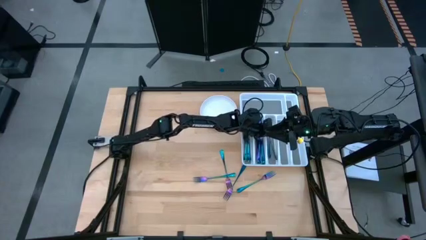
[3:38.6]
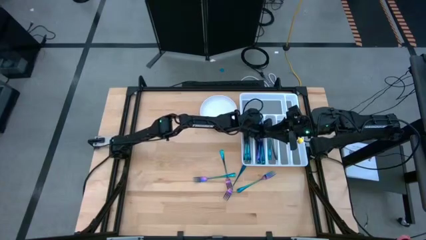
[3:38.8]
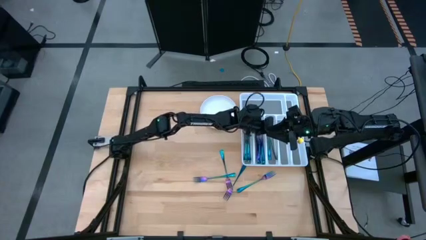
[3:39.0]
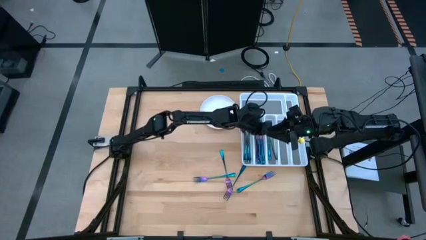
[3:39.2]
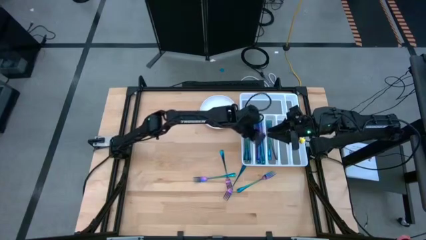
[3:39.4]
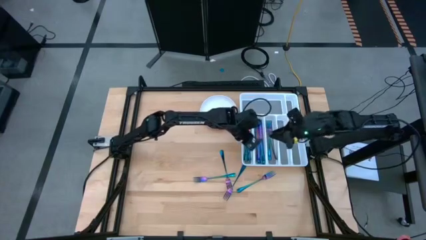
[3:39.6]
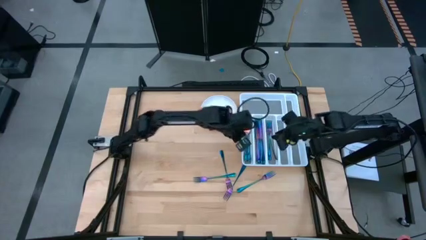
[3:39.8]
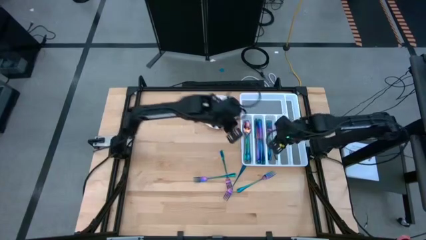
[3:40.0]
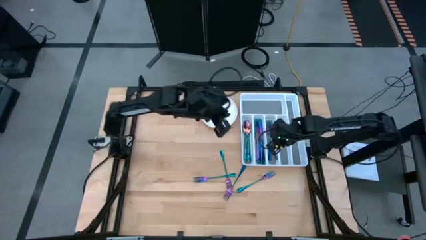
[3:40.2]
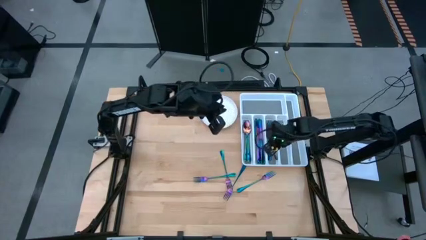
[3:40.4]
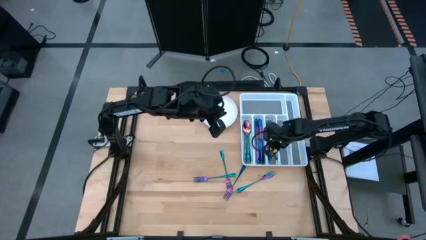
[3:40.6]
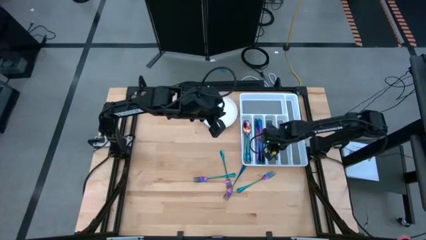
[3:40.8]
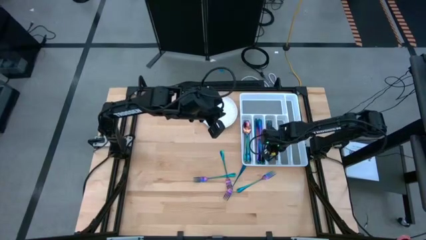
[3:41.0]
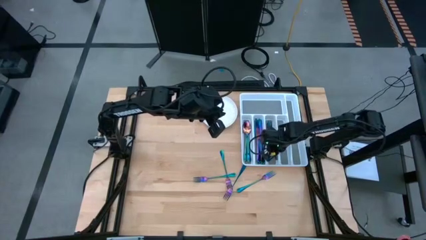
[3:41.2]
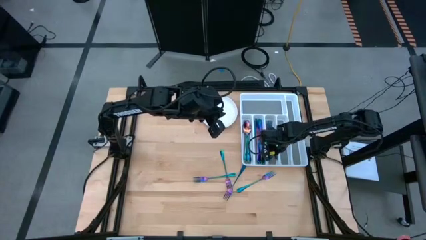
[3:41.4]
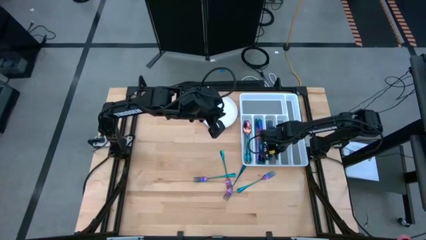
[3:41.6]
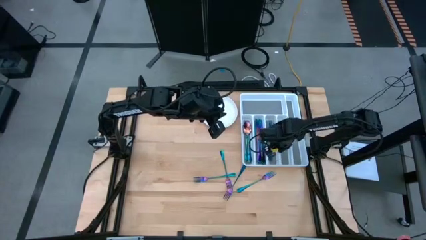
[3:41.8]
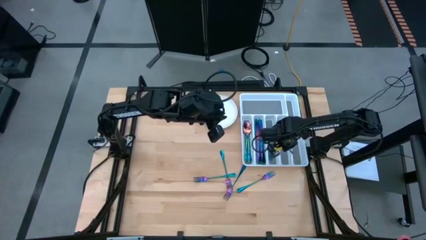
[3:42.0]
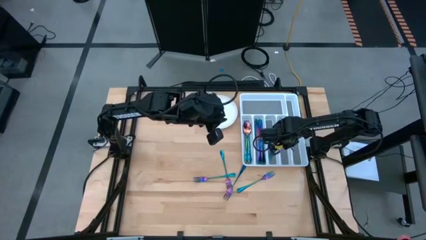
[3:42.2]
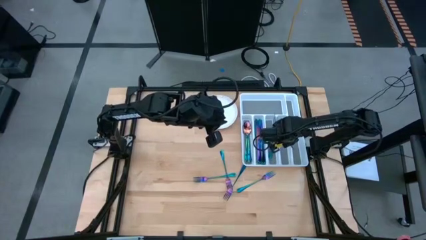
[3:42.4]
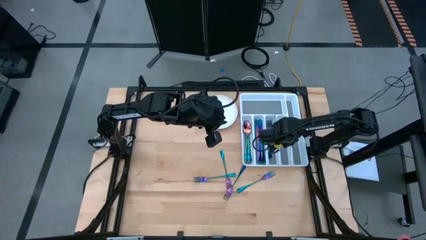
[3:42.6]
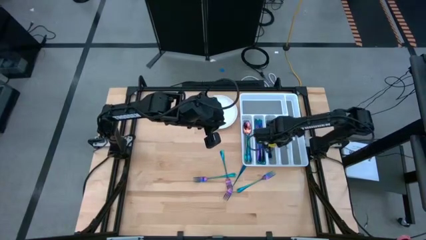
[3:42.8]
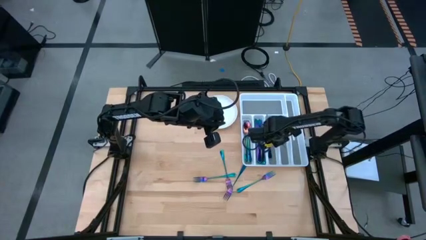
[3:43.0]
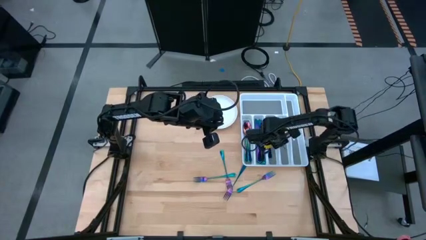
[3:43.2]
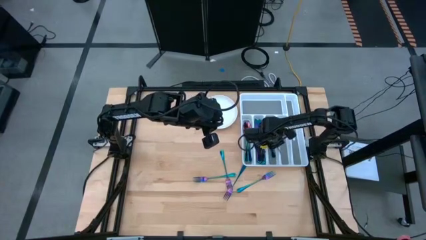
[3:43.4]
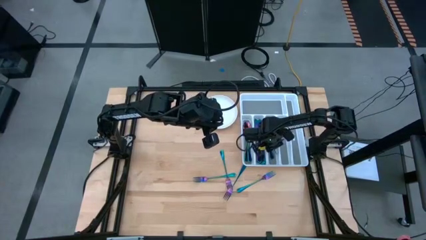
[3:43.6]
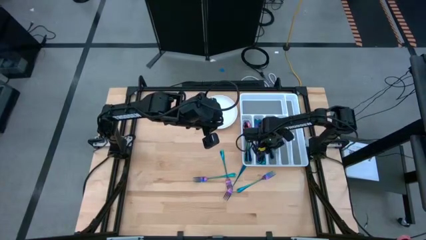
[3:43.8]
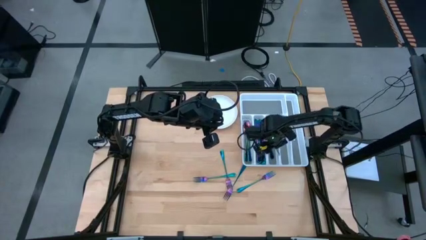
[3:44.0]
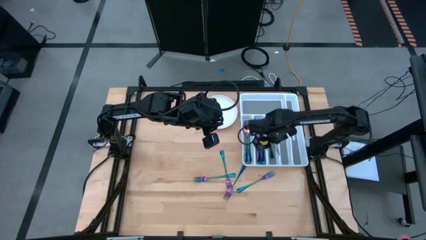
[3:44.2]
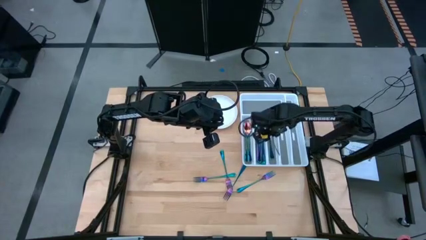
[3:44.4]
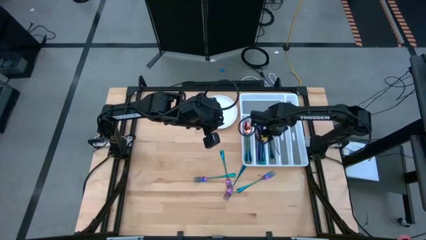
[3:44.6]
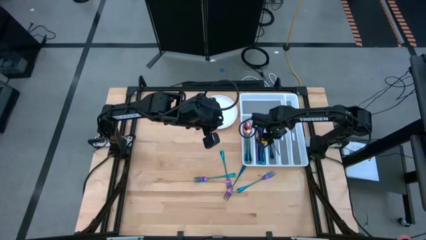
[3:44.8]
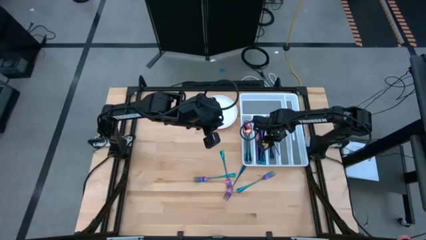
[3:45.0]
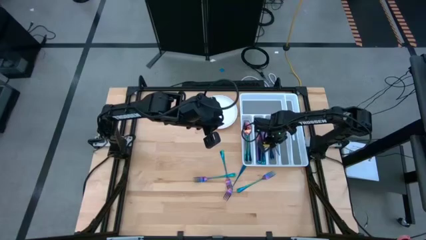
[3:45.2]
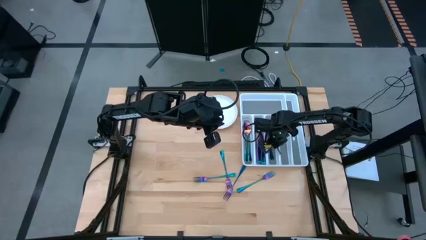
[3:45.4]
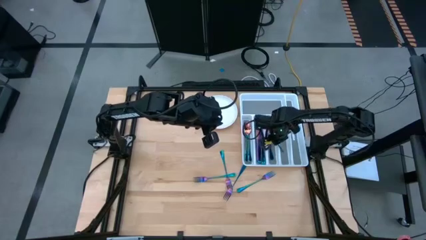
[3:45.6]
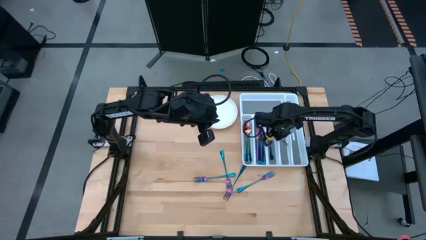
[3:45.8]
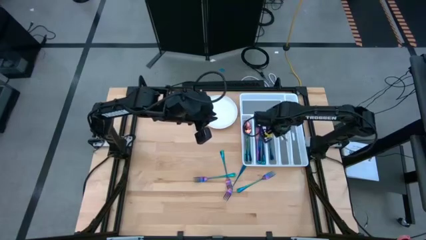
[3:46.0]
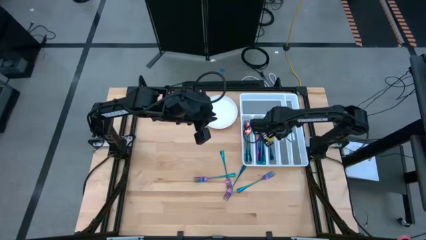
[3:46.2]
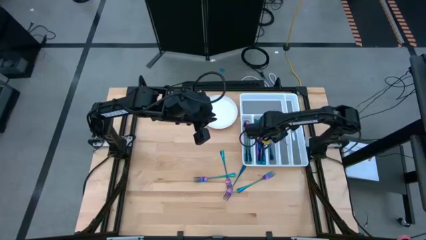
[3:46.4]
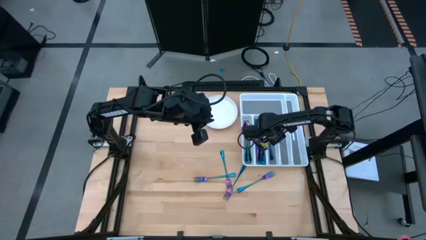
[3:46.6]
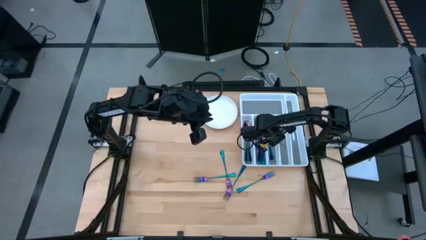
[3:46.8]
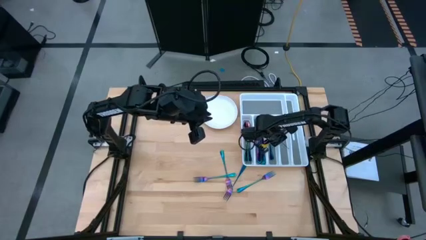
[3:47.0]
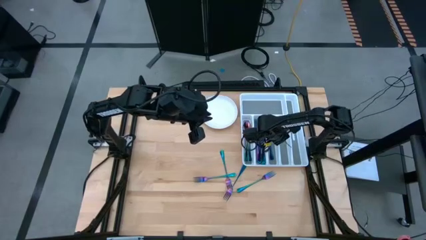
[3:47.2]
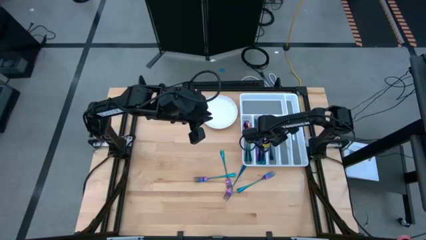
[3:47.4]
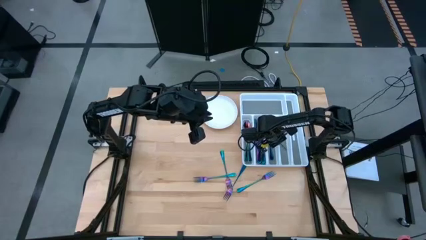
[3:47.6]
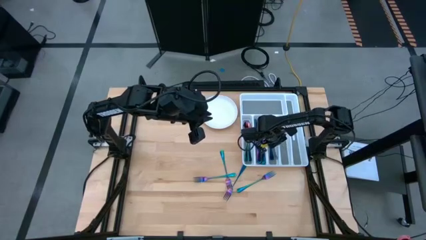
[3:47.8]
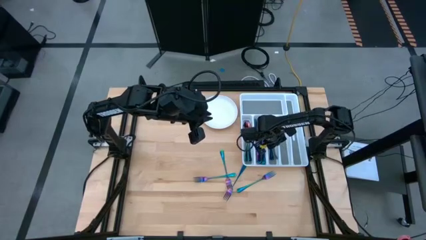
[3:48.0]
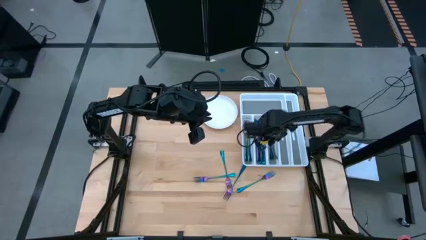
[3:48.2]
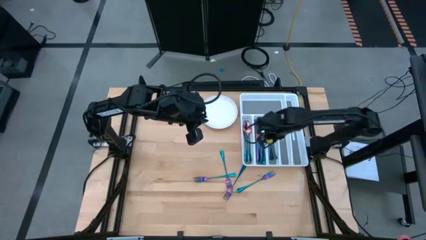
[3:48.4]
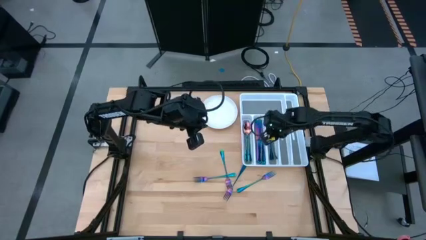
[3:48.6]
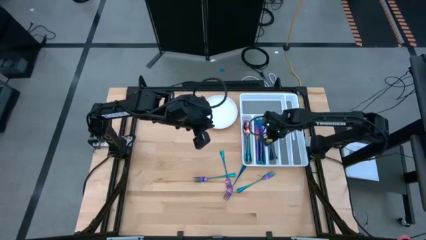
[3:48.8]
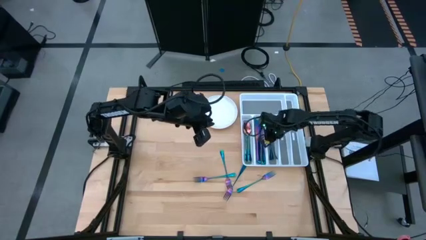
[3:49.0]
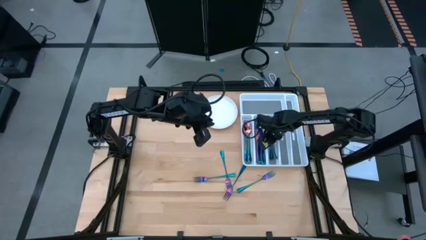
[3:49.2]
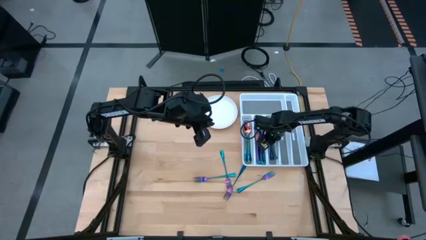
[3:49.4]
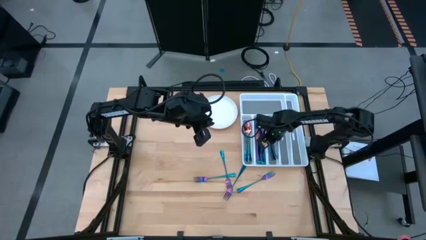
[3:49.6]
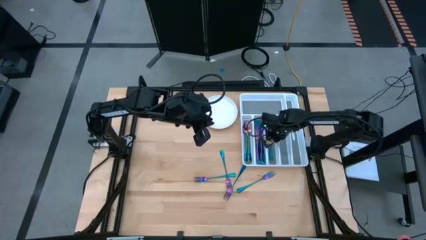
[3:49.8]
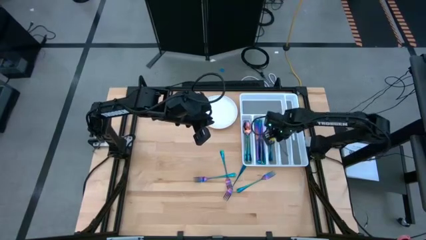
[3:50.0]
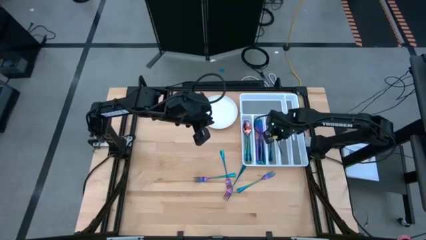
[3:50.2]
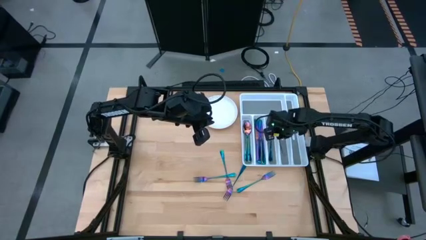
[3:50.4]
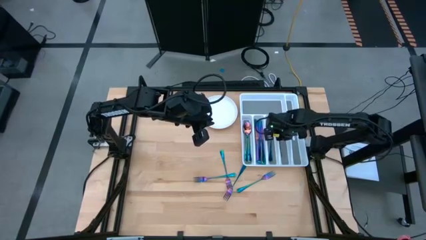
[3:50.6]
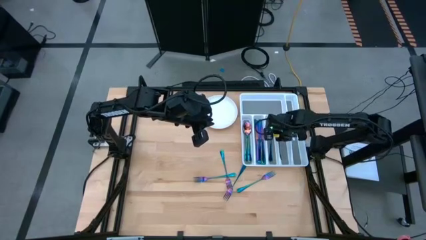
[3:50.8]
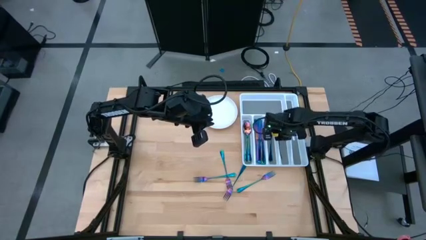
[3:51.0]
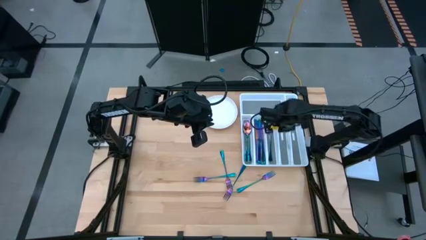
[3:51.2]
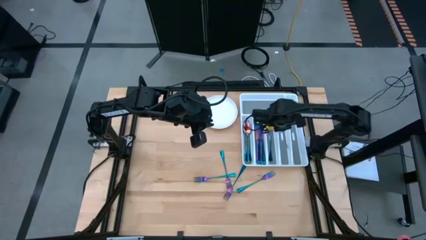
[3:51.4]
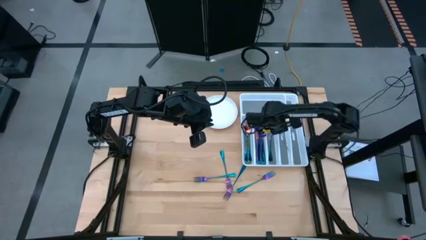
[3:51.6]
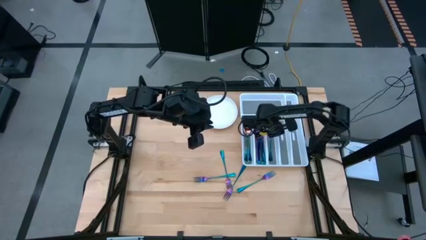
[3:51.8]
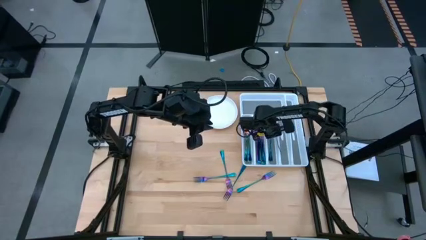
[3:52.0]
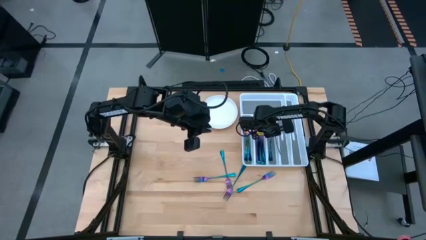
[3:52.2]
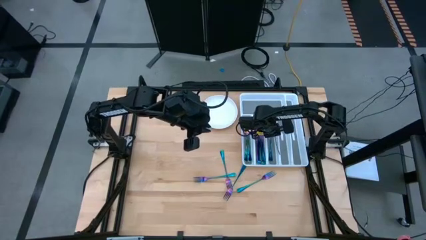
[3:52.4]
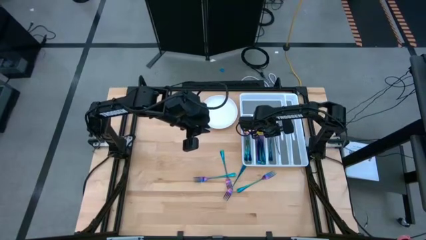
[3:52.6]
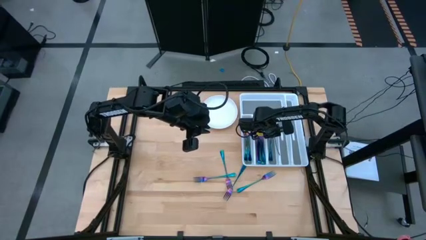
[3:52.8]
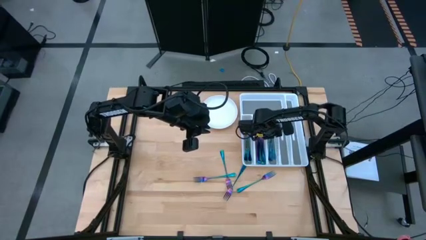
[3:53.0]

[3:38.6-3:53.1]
Task: Sort silverware
Adjust the purple fork on the white silverware tray

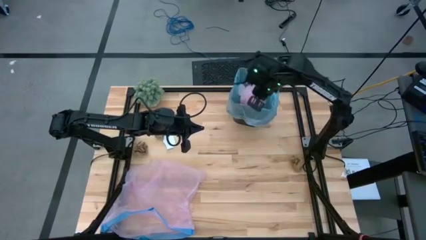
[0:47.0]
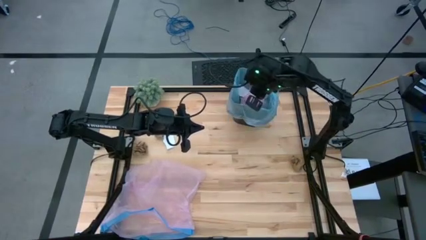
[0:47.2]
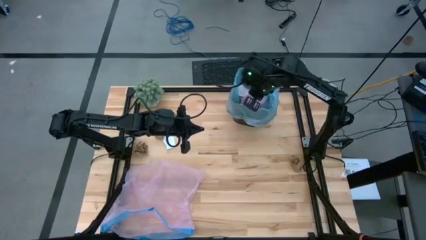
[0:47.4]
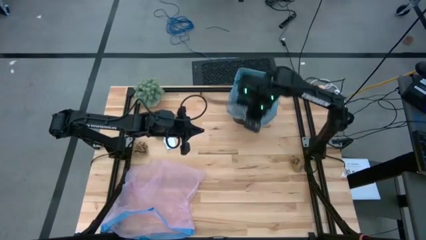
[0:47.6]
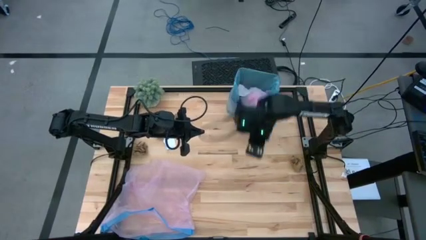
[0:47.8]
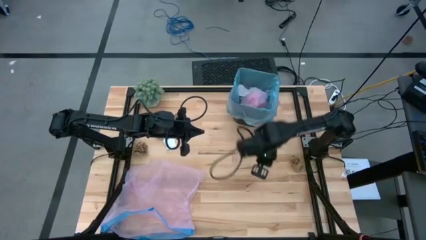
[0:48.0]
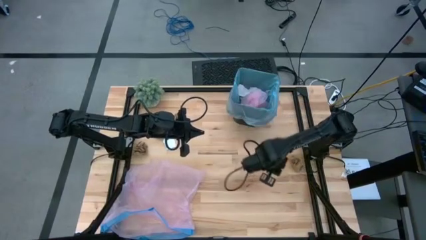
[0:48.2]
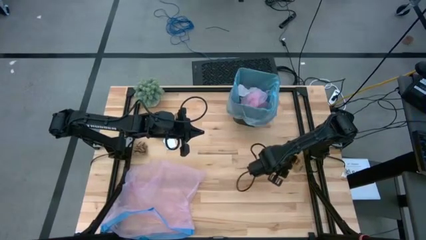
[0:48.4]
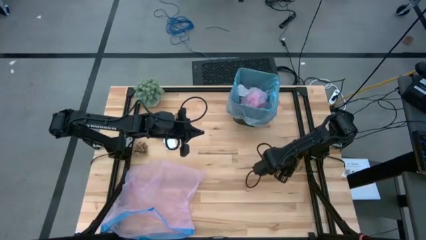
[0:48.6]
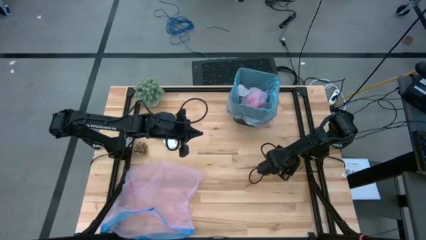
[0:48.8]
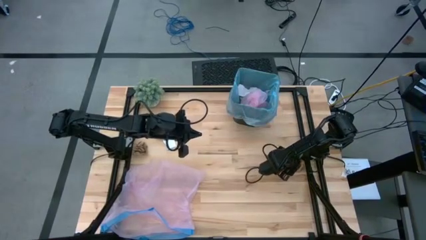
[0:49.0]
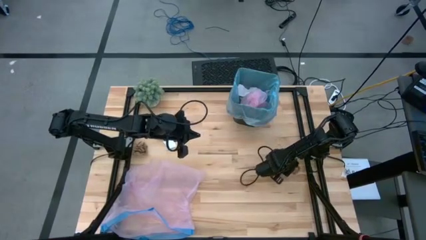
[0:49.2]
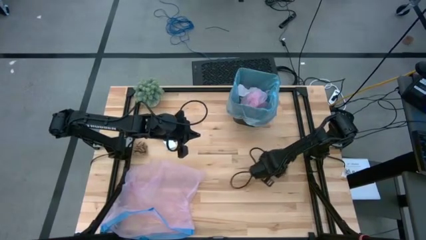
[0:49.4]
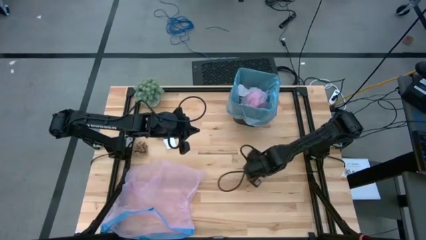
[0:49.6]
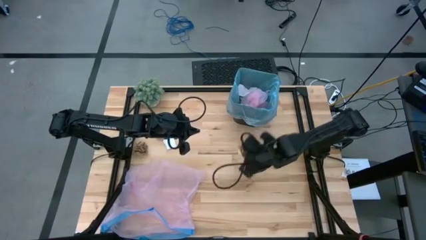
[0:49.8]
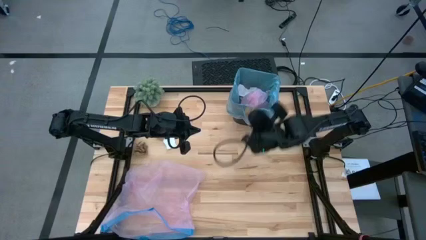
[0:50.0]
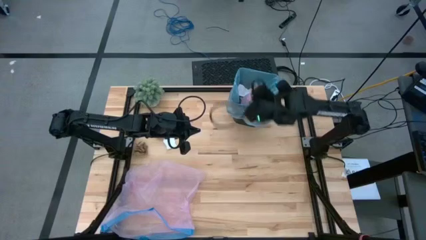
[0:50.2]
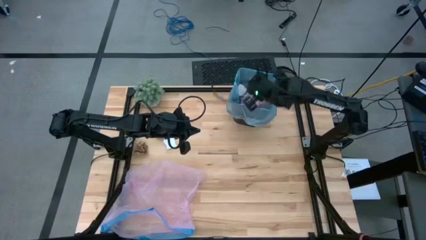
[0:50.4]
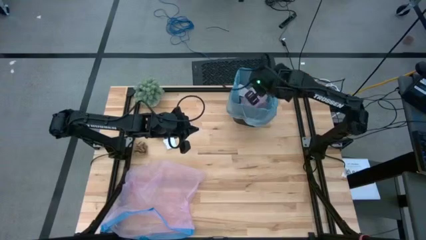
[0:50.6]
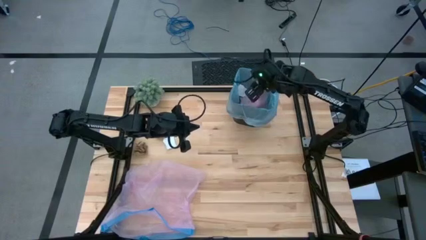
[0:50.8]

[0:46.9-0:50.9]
Task: place trash/remove bag and relplace
Put the brown napkin into the trash bin
